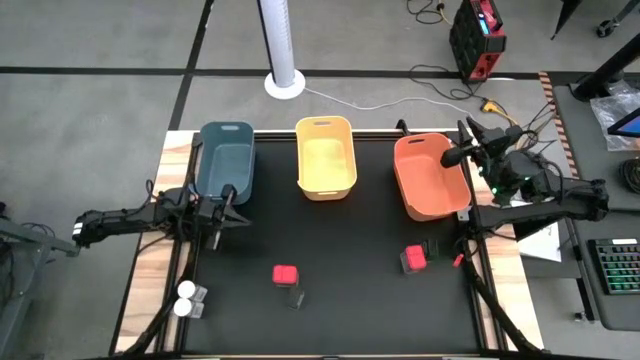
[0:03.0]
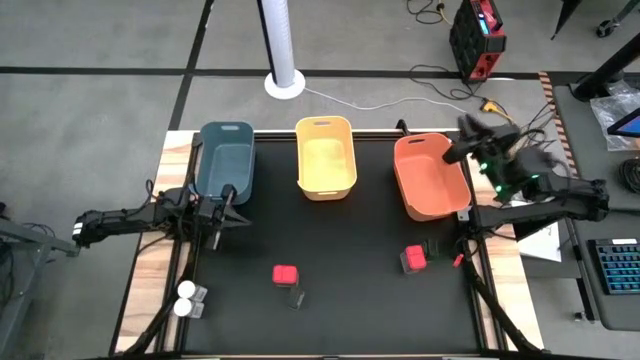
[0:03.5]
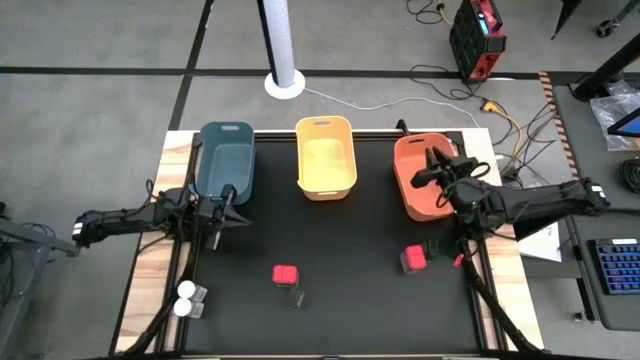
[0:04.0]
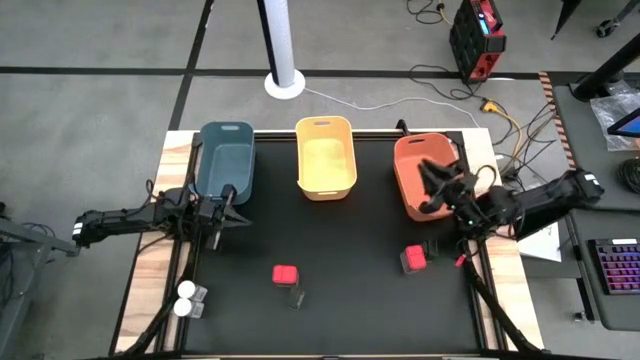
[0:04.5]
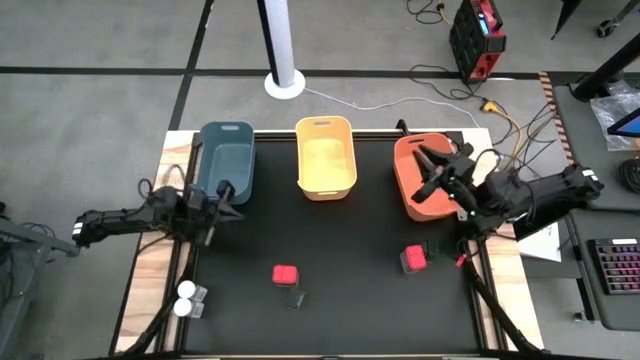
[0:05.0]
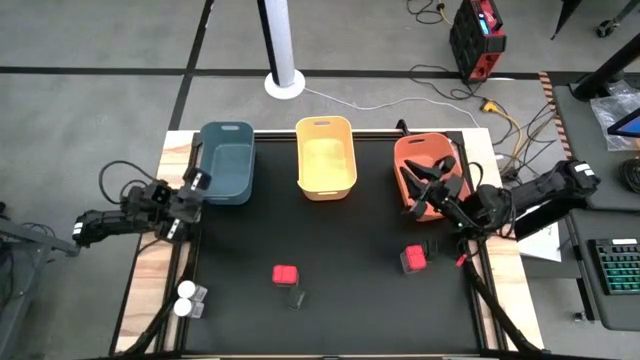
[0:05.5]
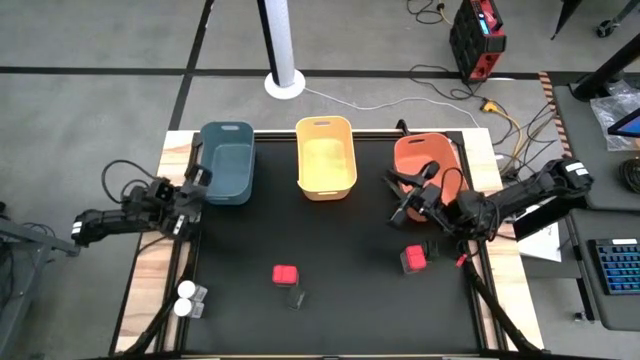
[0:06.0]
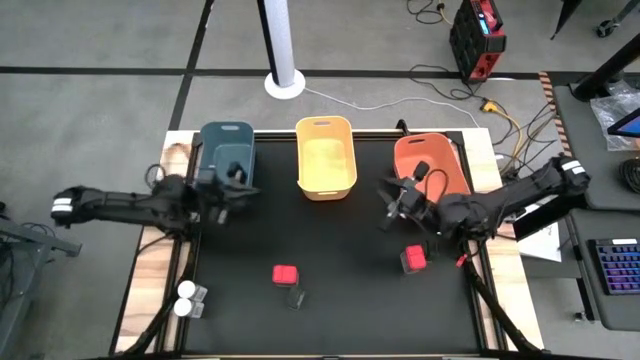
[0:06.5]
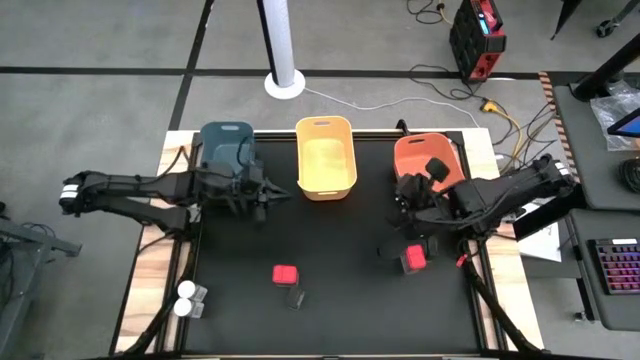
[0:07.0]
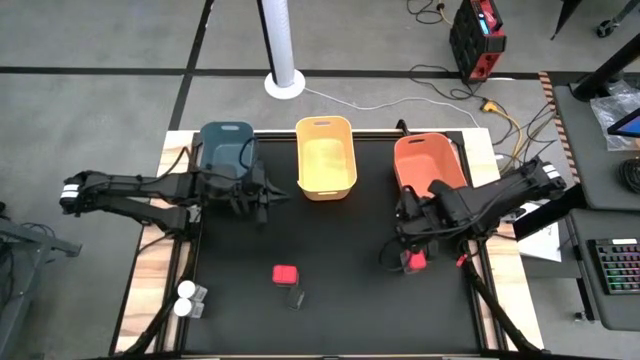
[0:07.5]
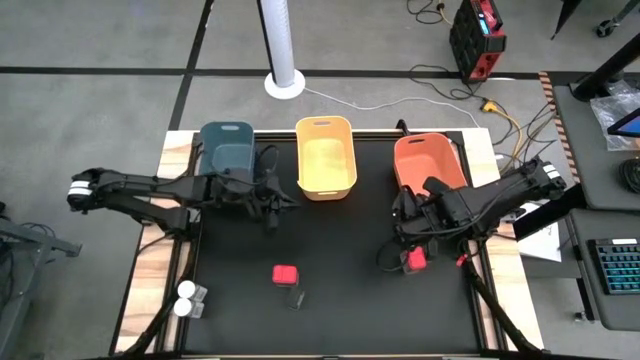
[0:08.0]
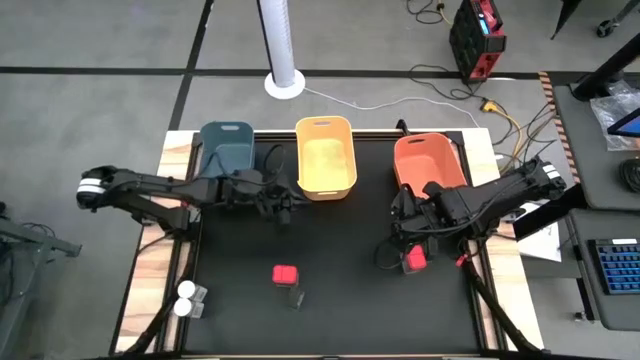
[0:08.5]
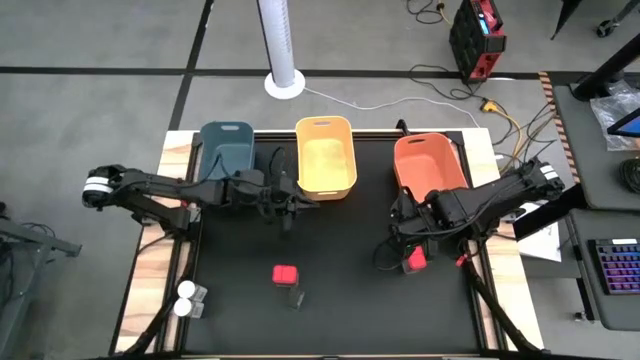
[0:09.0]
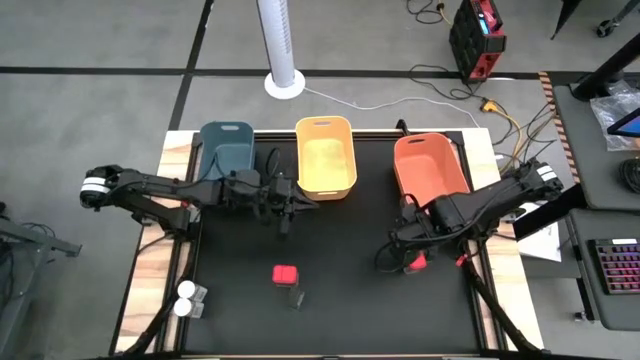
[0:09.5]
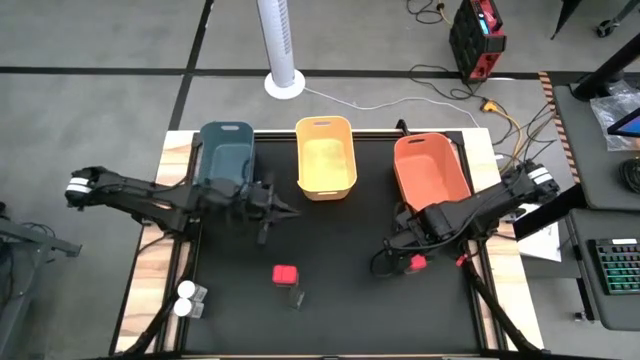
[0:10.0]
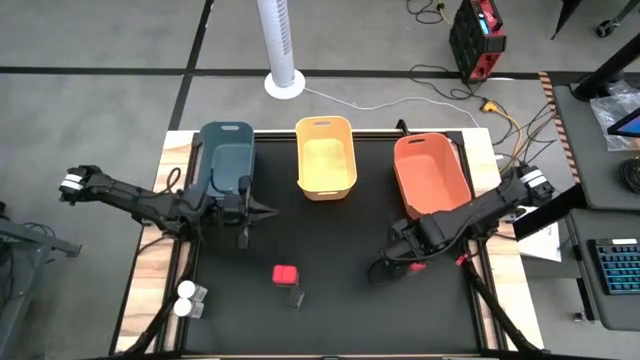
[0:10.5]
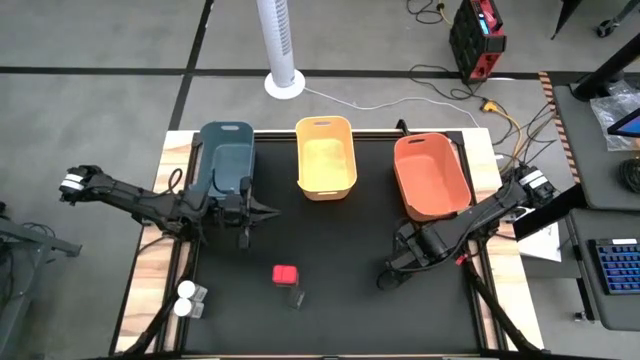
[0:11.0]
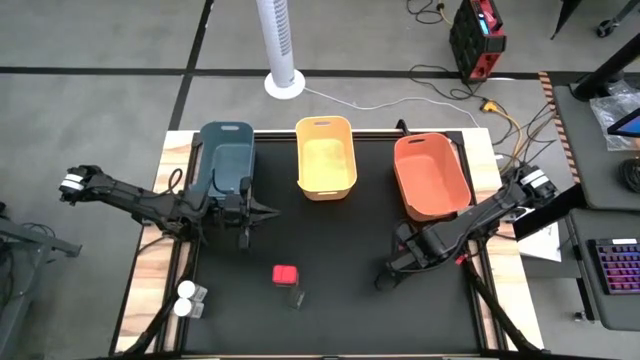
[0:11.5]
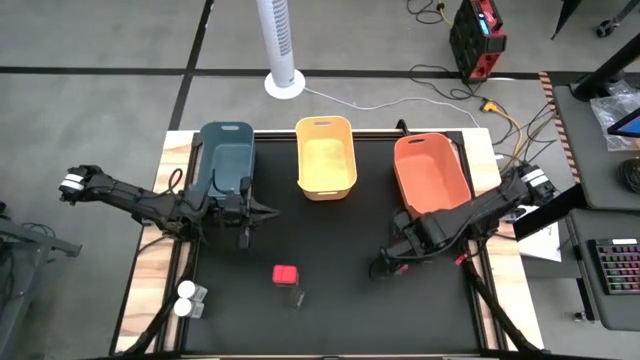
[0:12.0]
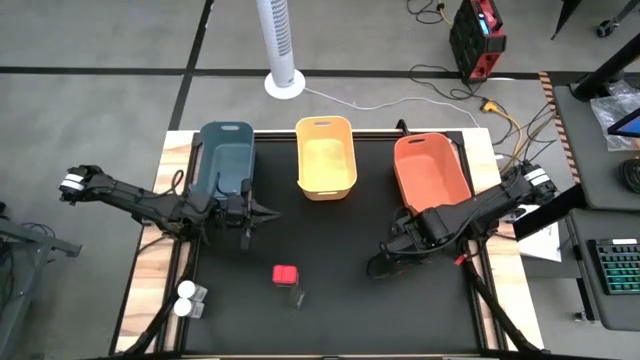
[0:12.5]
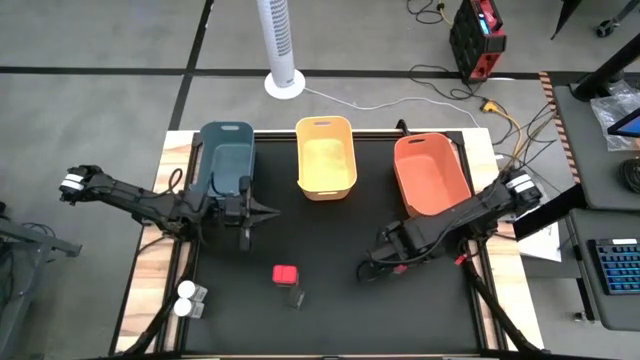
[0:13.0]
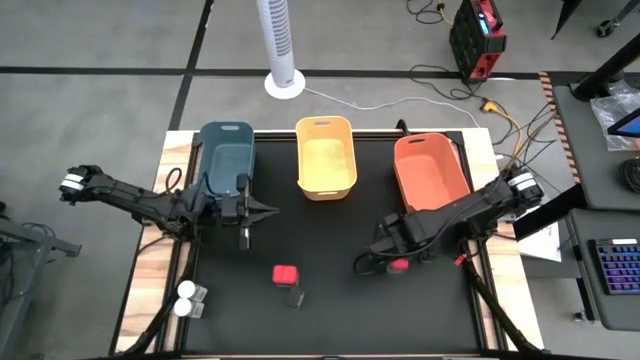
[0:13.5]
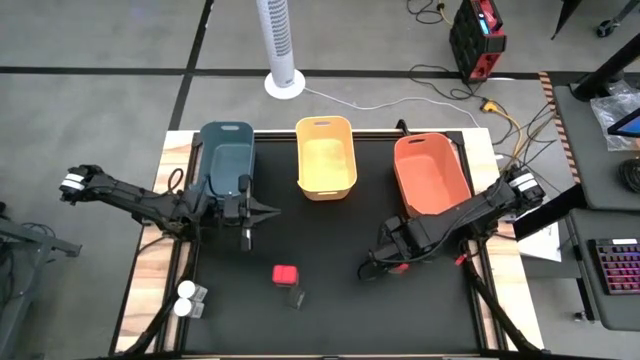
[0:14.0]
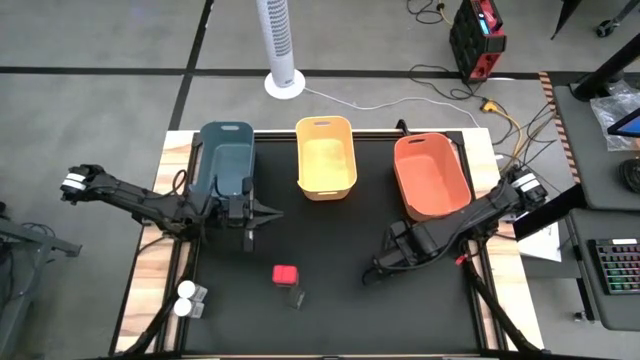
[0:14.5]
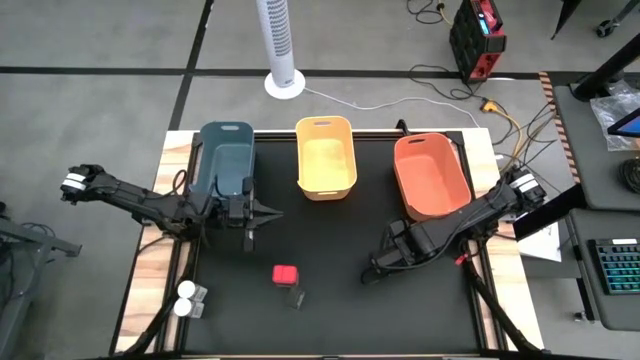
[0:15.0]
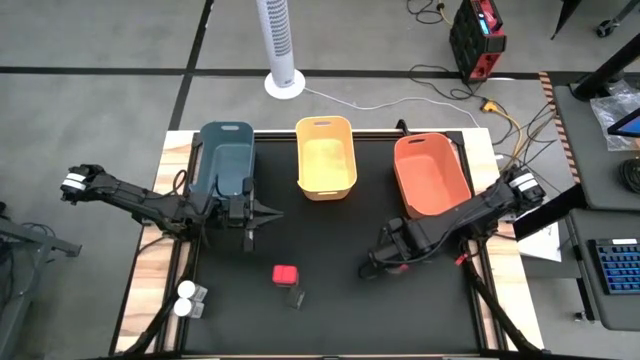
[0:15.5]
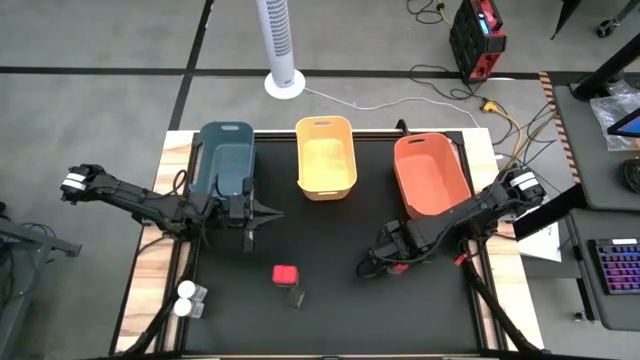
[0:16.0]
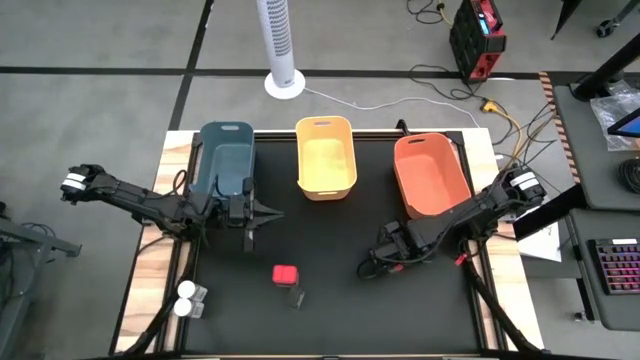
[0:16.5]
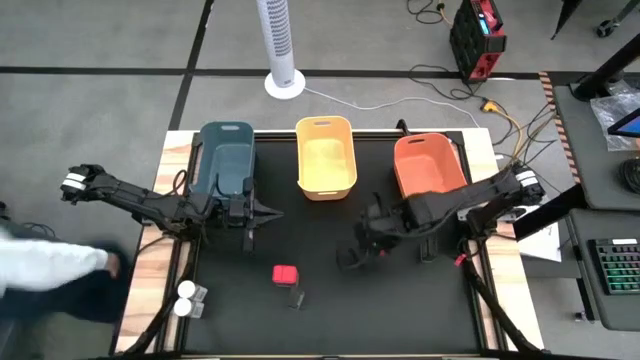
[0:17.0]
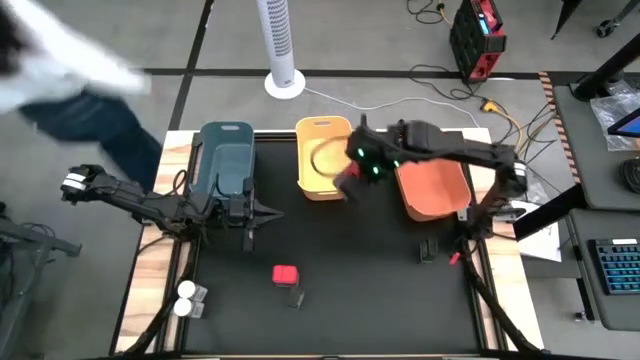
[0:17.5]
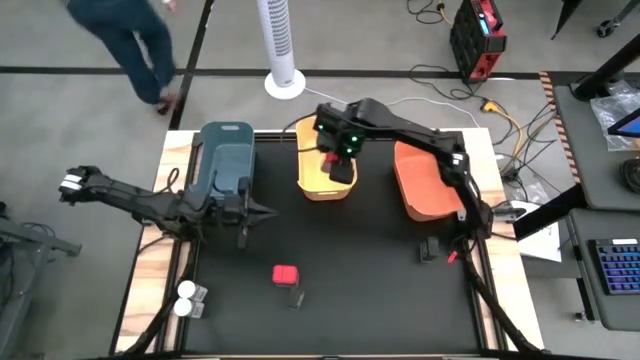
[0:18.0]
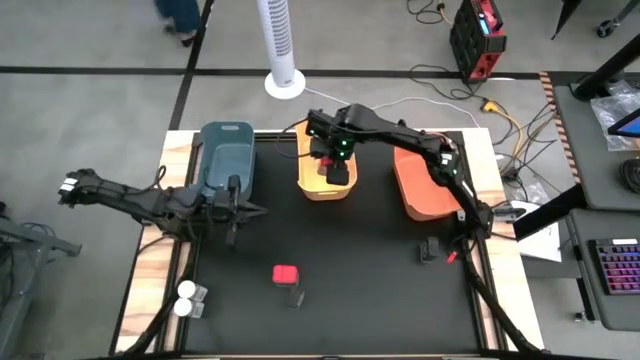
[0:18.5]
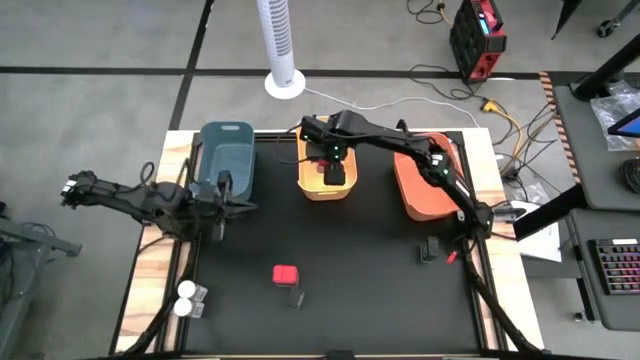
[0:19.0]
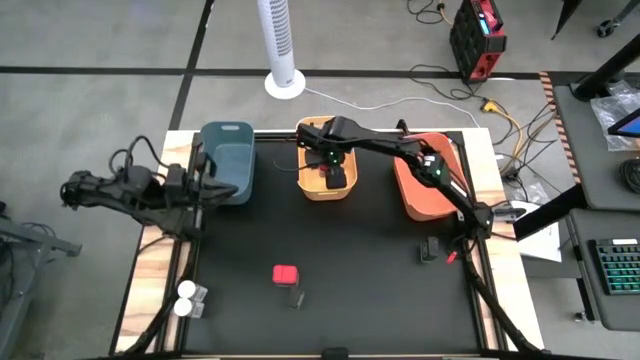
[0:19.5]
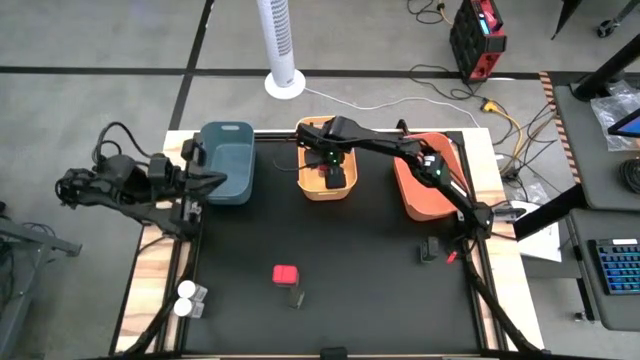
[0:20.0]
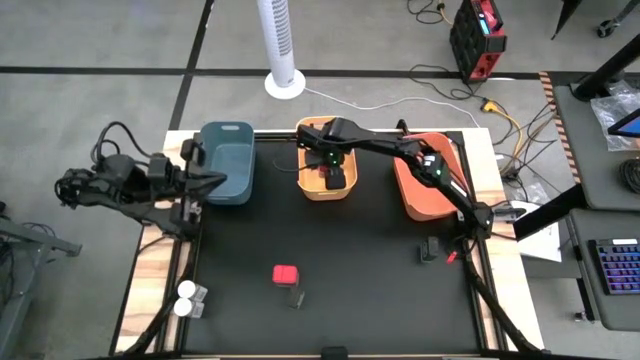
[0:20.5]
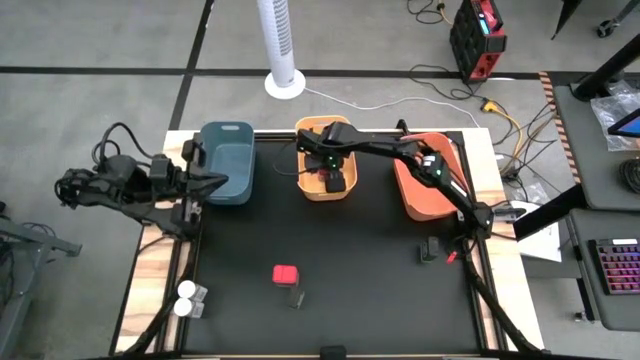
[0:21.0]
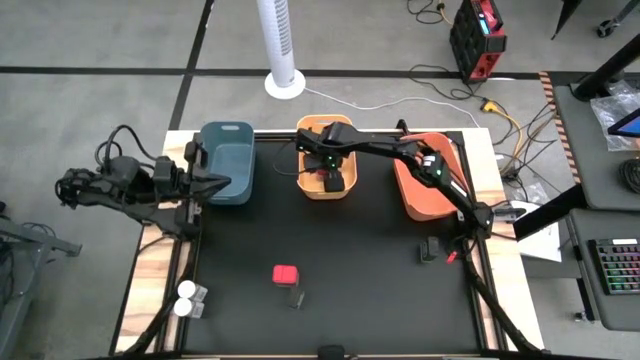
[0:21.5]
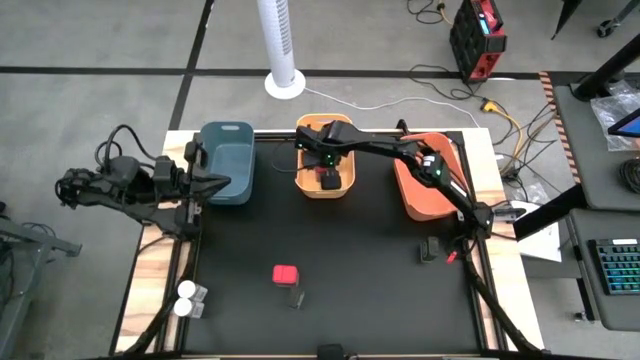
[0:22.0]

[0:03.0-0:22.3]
Task: Sort spices by type
Put the right red seasoning can into the yellow bin
